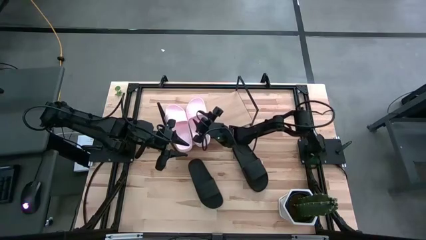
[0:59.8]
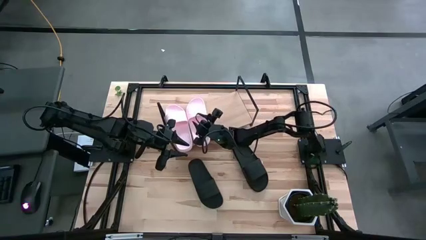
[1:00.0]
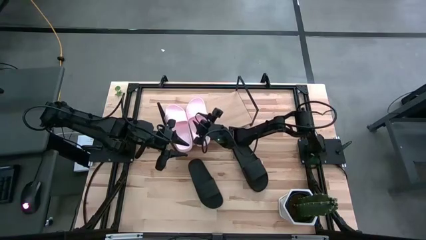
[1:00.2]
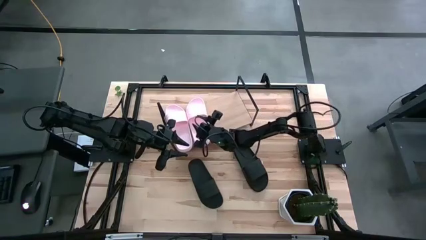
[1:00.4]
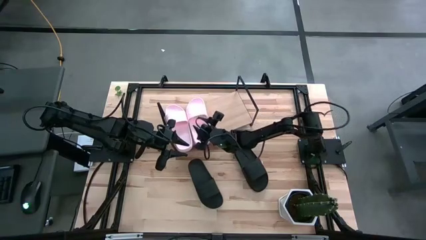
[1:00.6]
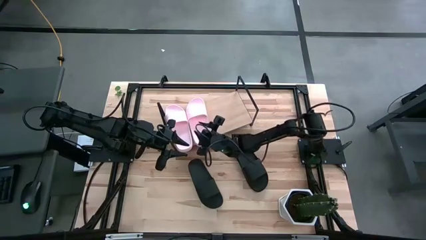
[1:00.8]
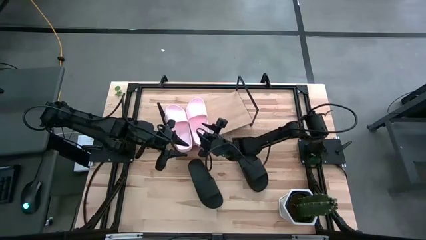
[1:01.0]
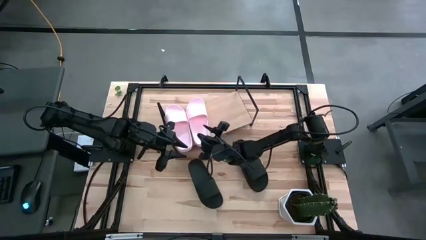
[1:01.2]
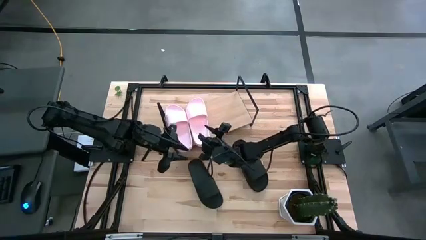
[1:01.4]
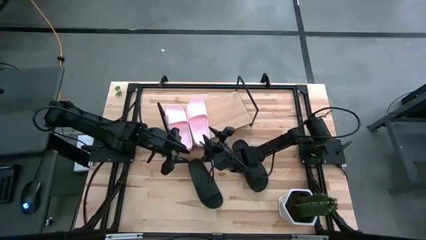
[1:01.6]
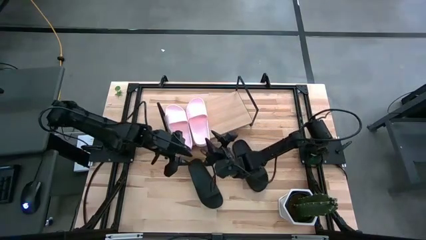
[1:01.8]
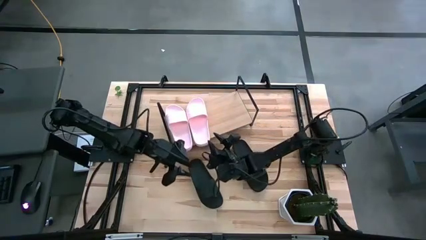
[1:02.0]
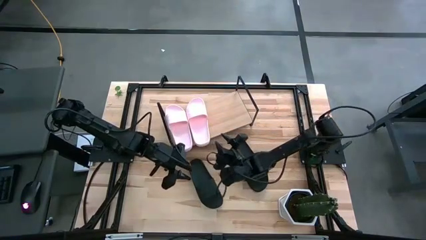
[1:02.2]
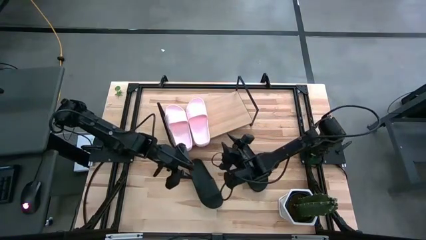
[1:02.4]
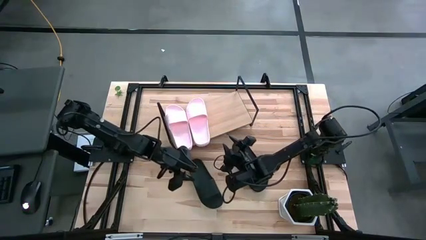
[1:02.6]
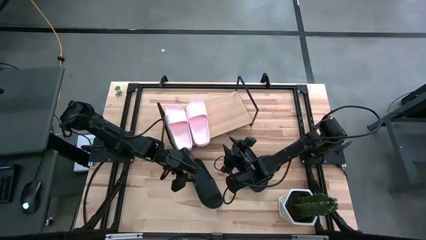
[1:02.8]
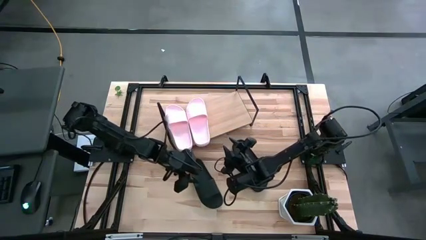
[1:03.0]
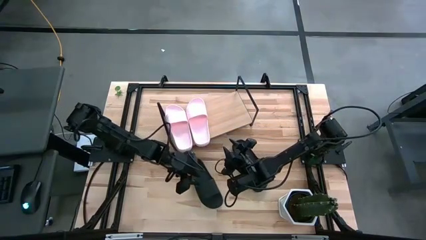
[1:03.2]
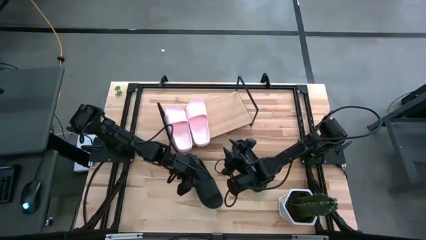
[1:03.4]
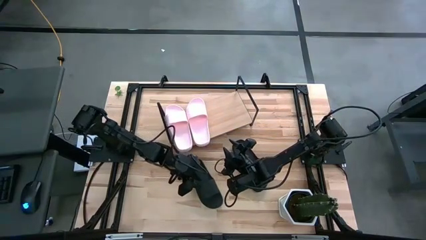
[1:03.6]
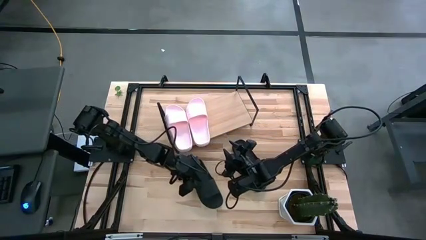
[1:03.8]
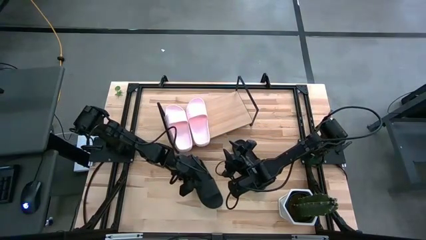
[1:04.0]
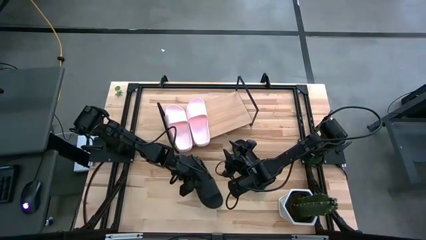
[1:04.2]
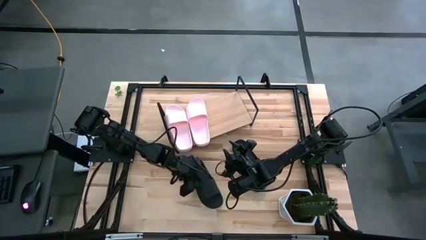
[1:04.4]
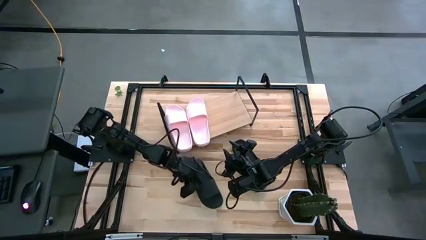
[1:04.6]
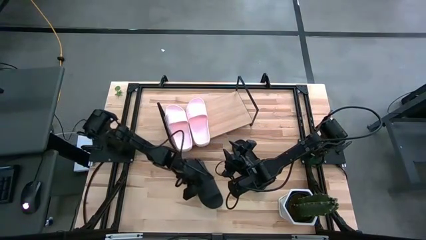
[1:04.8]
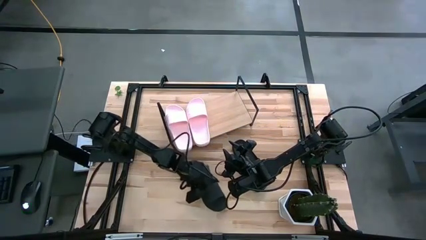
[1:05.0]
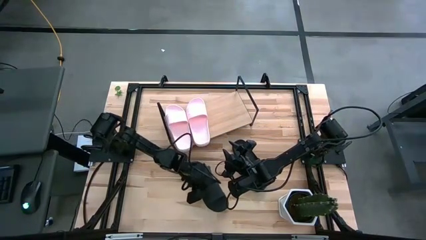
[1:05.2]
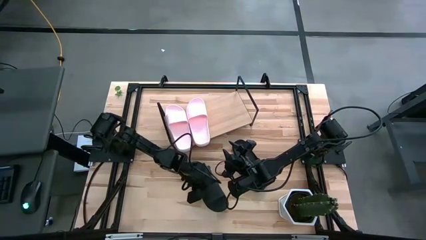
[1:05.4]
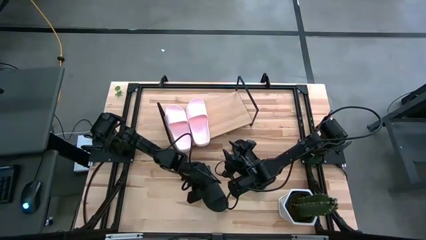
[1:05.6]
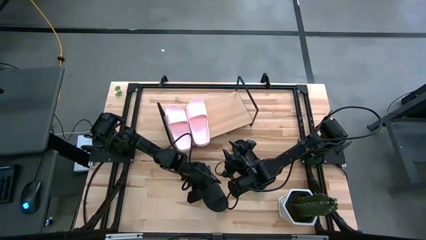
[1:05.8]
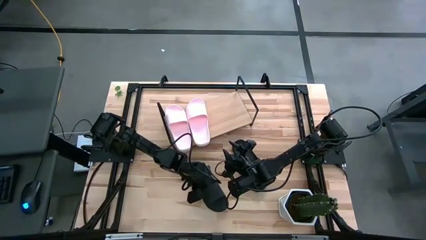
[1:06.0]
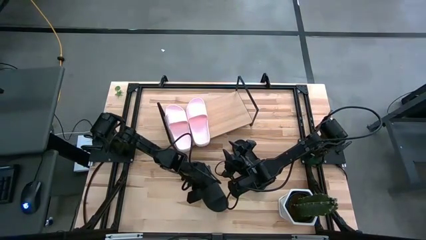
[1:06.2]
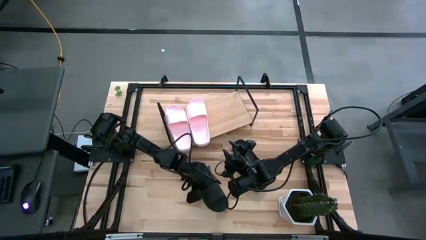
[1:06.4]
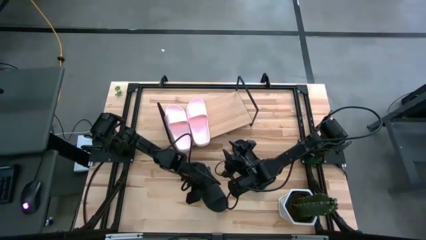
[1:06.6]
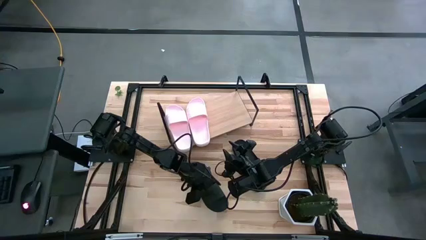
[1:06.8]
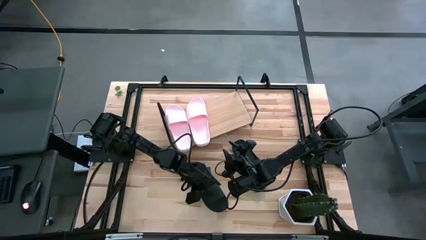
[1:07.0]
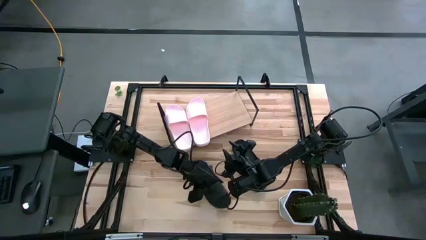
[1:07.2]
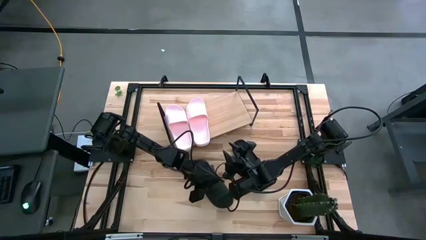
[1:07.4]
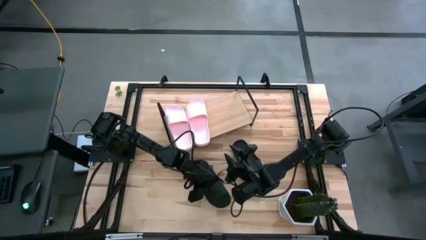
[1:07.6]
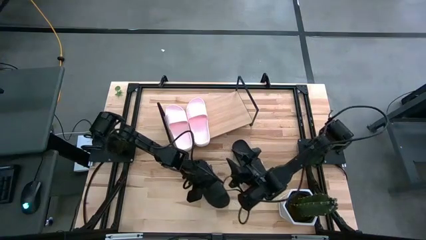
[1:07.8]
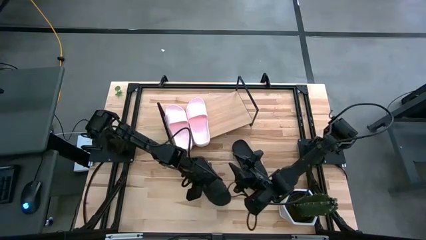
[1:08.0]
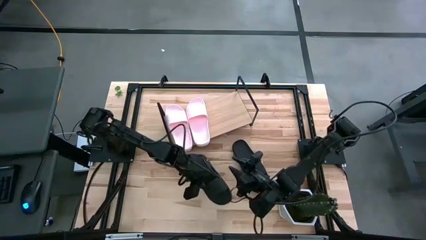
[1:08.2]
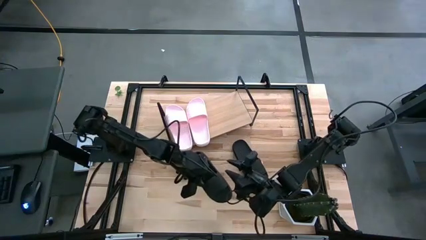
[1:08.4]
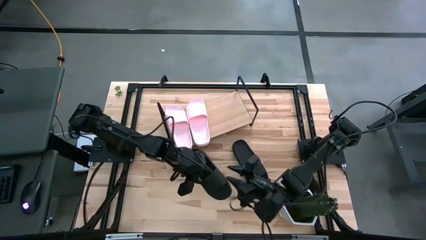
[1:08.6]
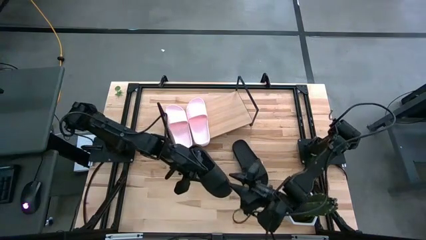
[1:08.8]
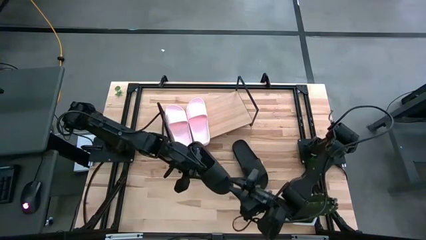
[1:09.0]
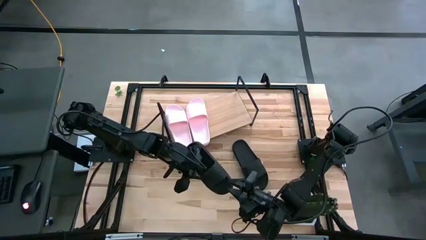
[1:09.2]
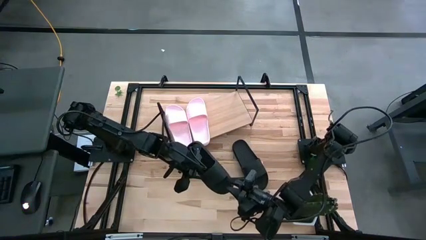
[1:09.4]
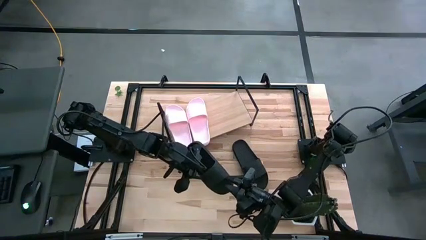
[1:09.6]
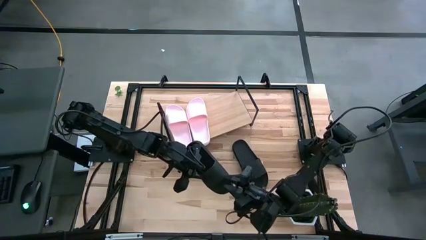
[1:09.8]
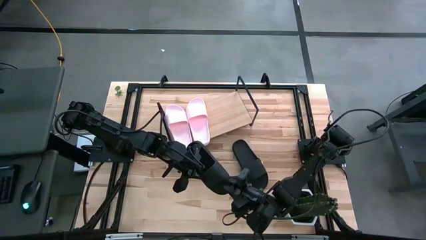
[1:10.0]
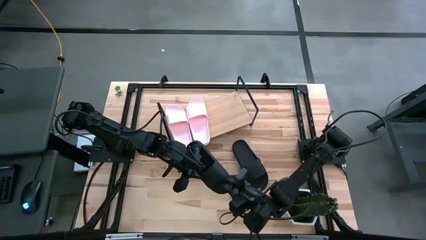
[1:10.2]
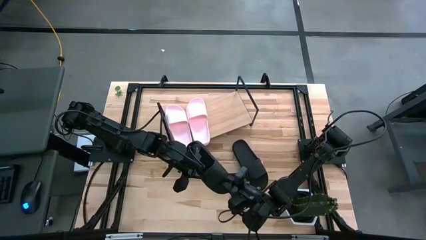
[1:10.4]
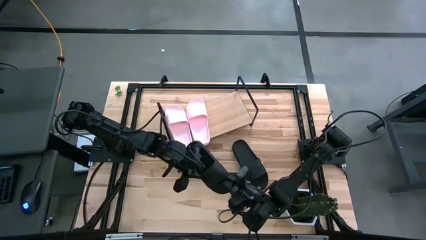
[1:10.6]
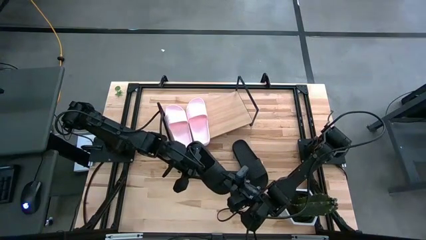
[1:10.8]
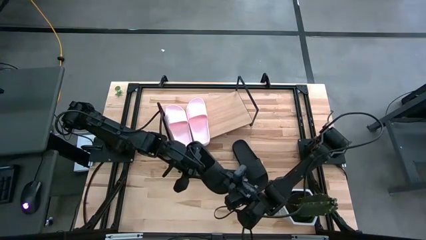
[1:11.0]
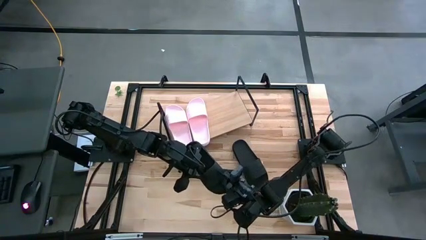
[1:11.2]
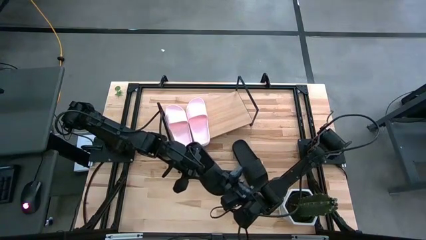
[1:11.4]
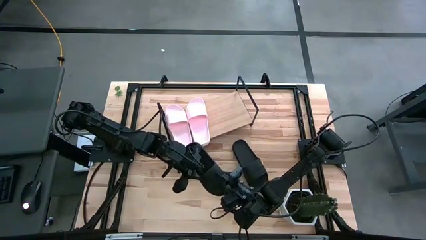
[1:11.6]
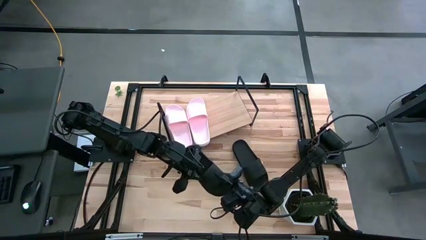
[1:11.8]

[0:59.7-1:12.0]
Task: Pick and place slides into the shelf
Put the left black slide on the shelf
